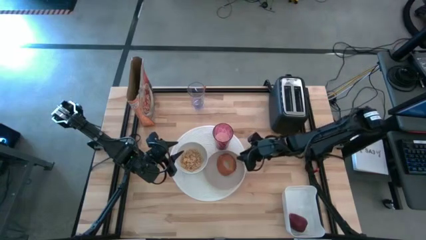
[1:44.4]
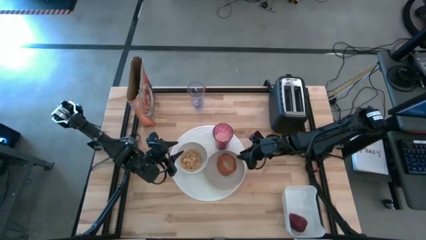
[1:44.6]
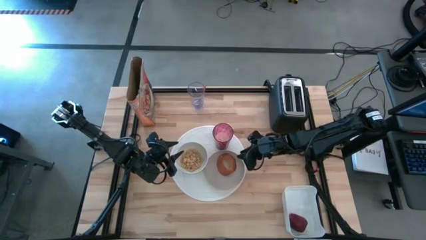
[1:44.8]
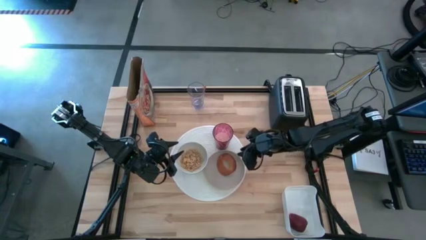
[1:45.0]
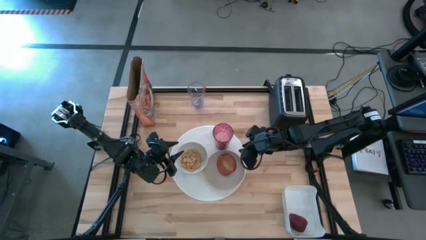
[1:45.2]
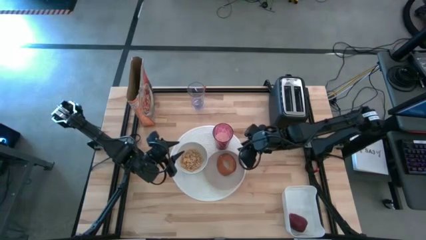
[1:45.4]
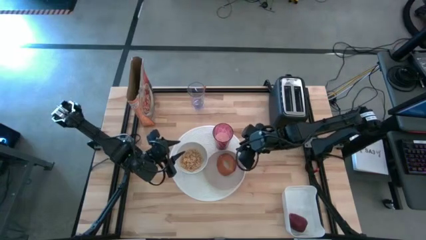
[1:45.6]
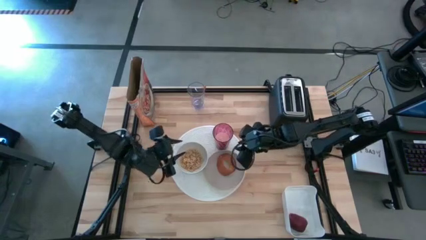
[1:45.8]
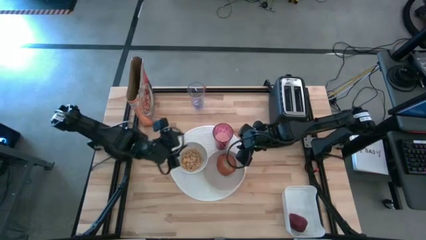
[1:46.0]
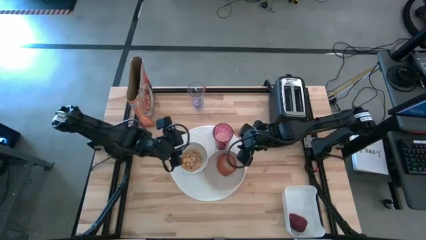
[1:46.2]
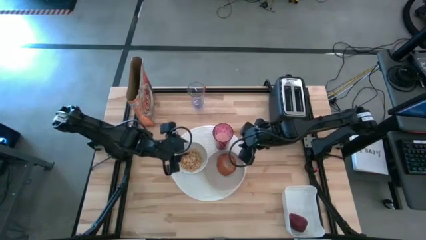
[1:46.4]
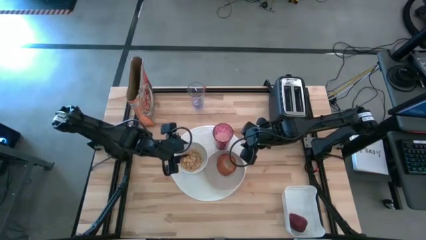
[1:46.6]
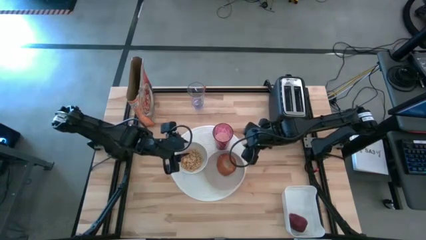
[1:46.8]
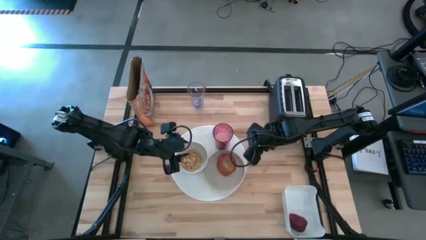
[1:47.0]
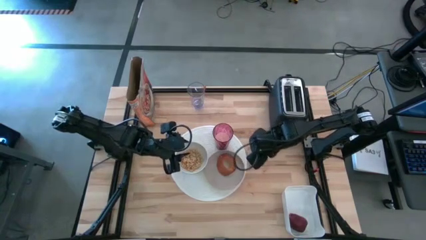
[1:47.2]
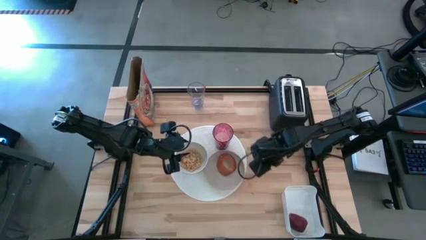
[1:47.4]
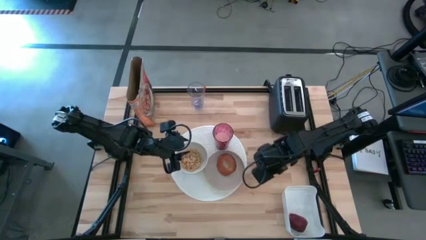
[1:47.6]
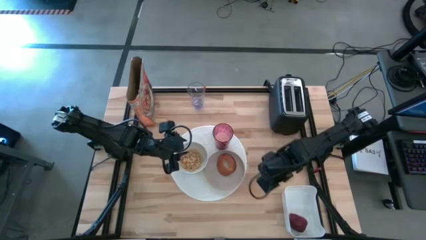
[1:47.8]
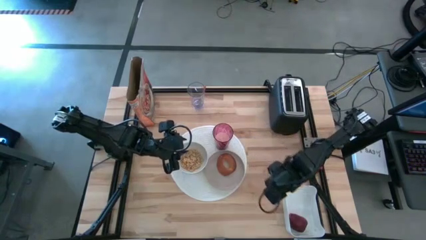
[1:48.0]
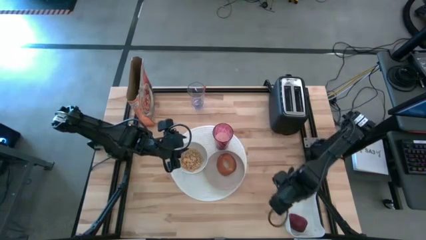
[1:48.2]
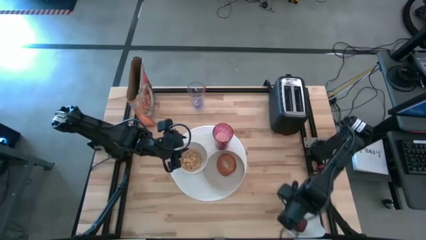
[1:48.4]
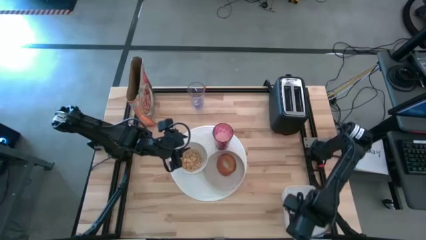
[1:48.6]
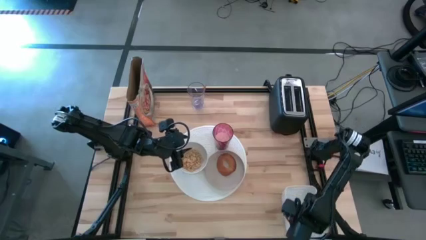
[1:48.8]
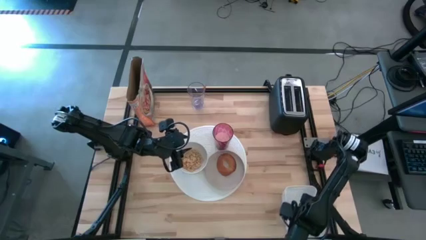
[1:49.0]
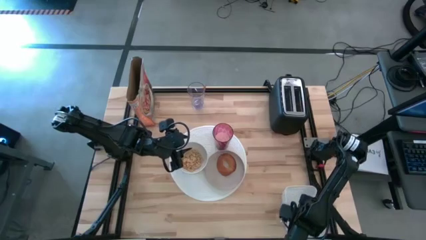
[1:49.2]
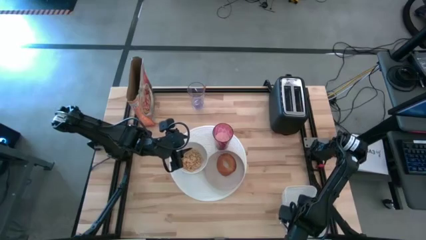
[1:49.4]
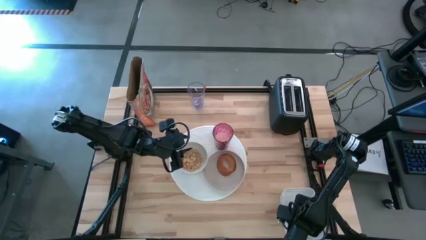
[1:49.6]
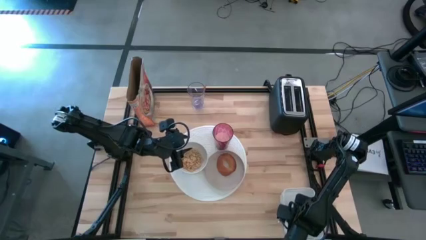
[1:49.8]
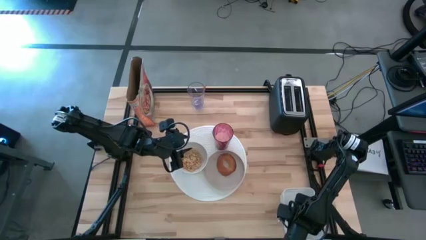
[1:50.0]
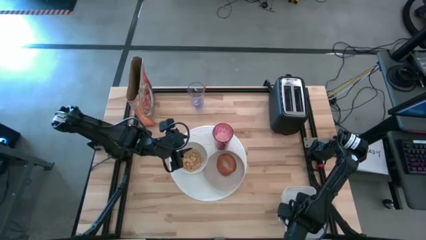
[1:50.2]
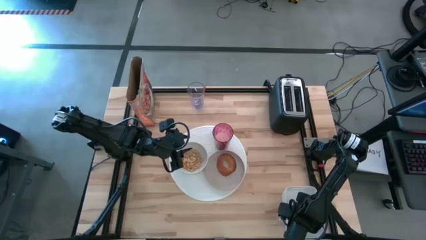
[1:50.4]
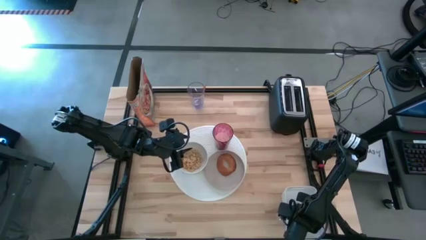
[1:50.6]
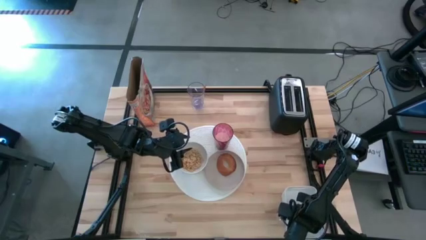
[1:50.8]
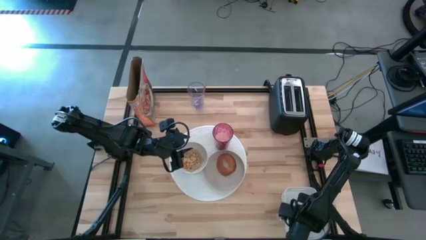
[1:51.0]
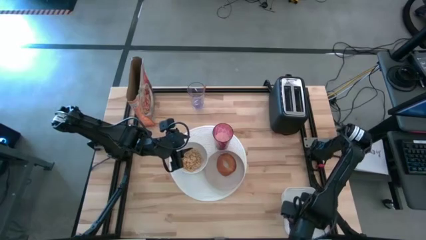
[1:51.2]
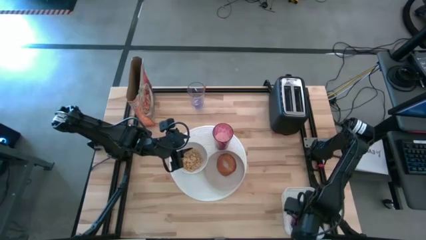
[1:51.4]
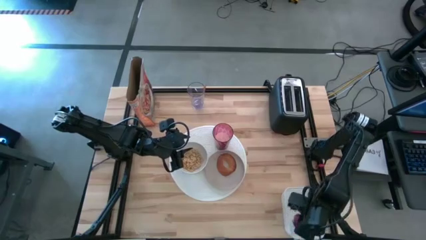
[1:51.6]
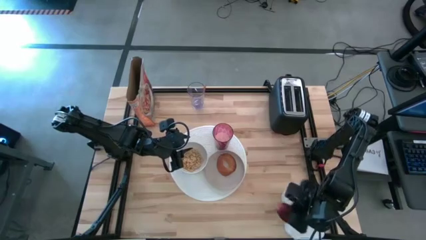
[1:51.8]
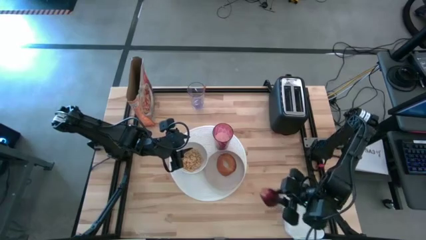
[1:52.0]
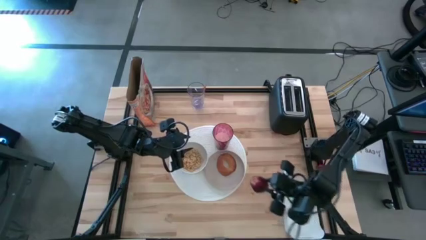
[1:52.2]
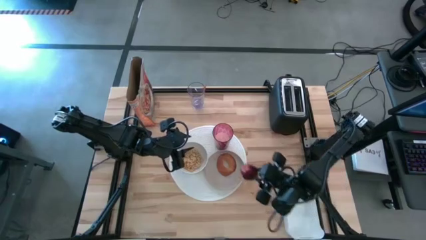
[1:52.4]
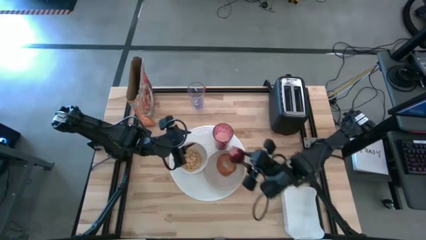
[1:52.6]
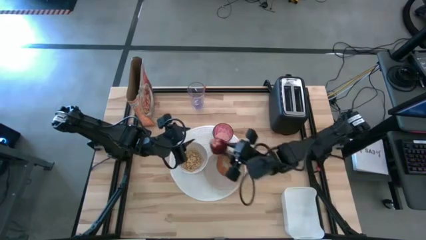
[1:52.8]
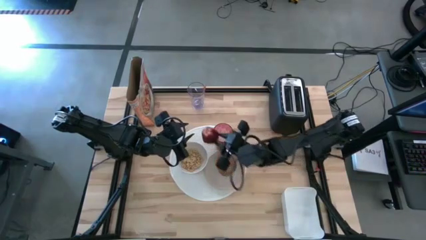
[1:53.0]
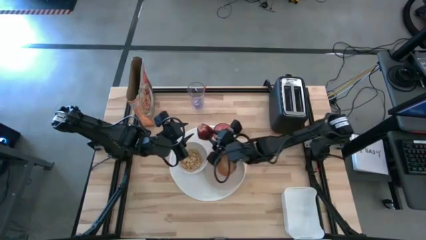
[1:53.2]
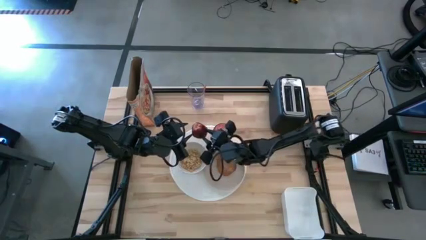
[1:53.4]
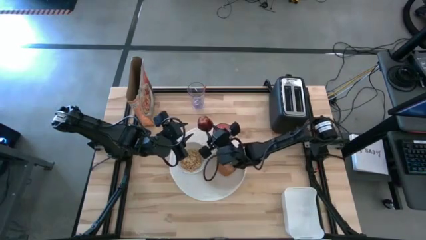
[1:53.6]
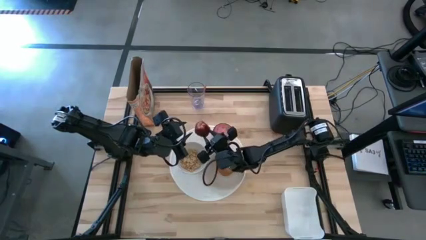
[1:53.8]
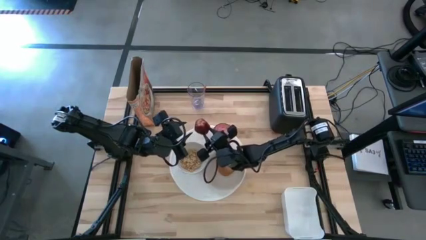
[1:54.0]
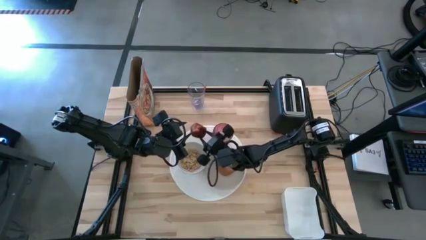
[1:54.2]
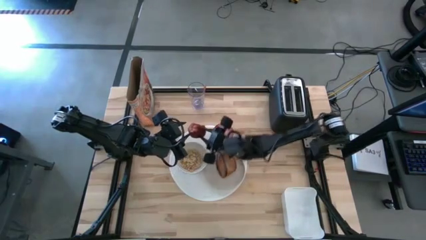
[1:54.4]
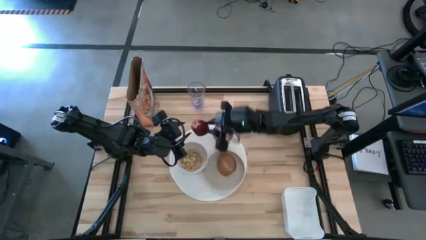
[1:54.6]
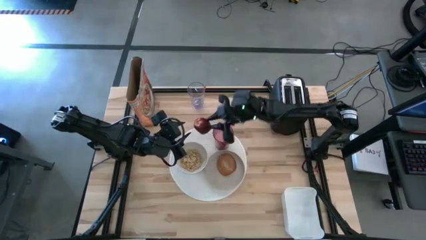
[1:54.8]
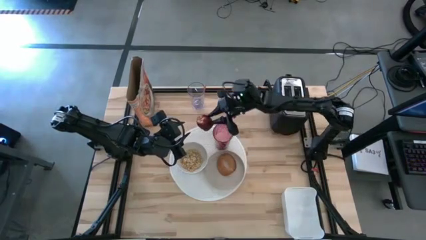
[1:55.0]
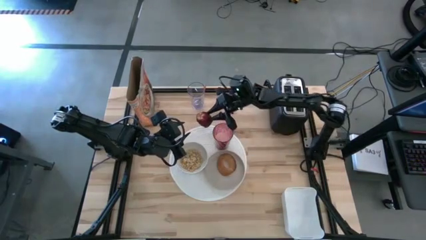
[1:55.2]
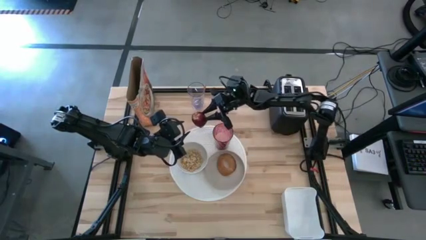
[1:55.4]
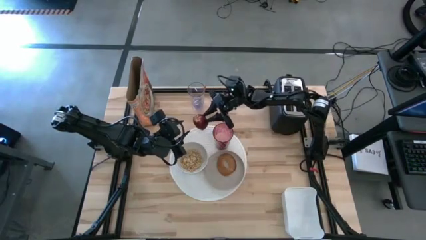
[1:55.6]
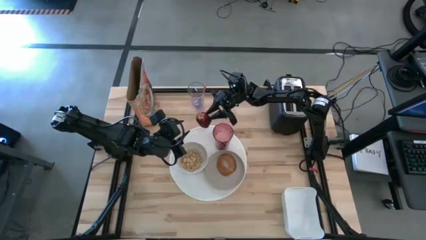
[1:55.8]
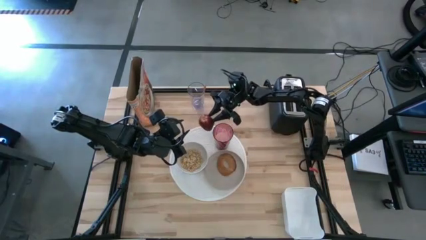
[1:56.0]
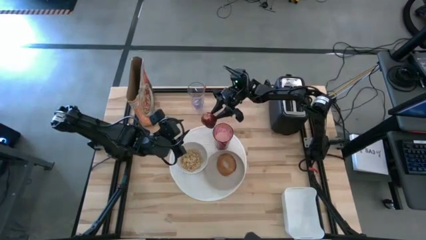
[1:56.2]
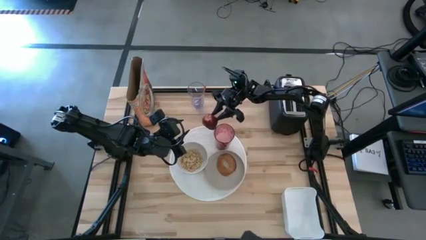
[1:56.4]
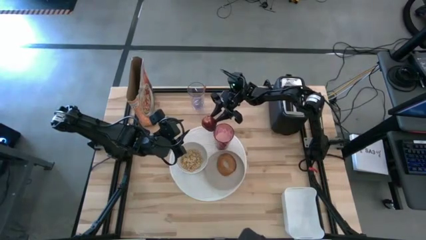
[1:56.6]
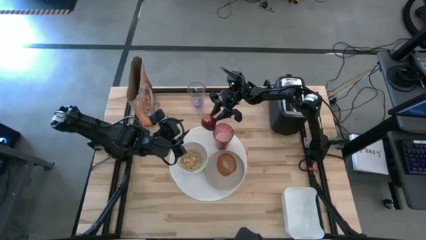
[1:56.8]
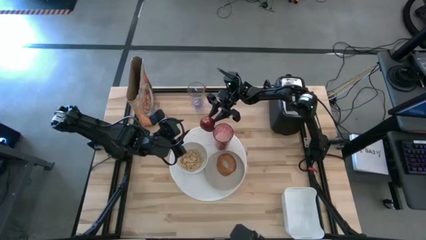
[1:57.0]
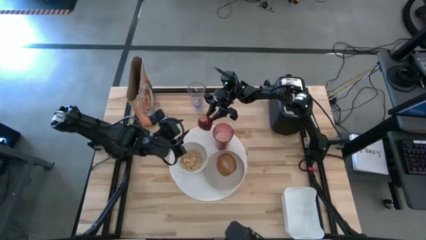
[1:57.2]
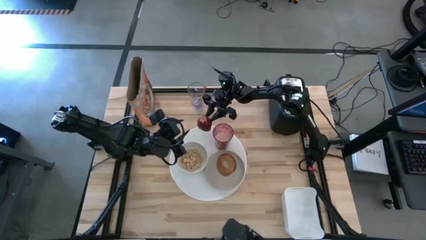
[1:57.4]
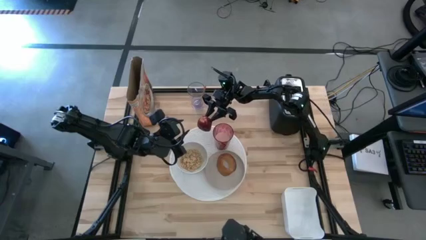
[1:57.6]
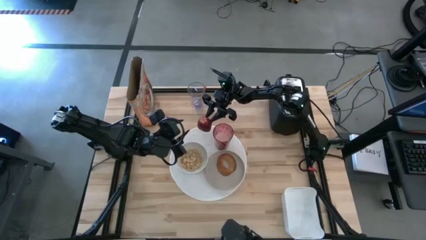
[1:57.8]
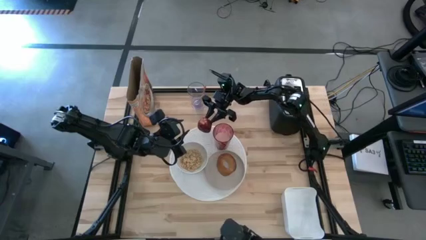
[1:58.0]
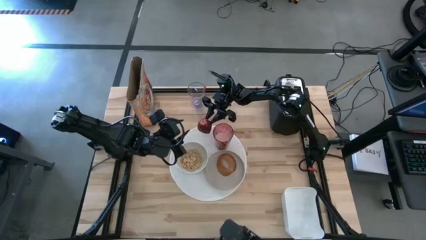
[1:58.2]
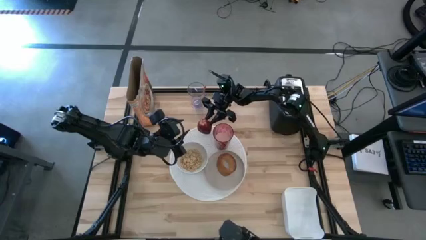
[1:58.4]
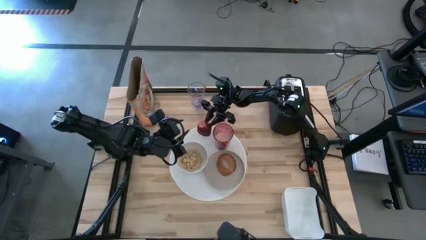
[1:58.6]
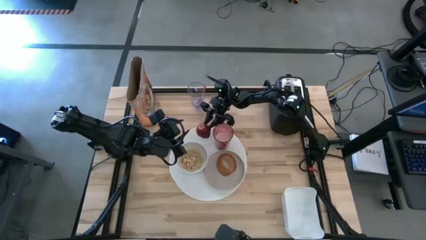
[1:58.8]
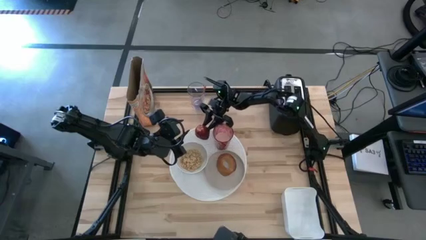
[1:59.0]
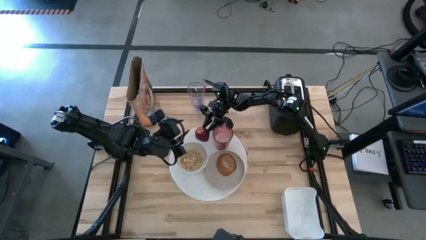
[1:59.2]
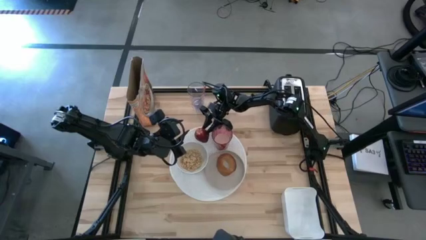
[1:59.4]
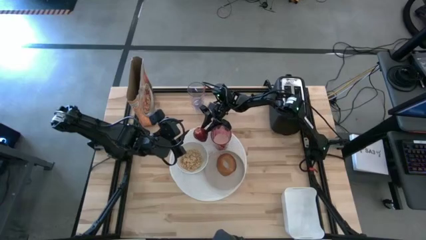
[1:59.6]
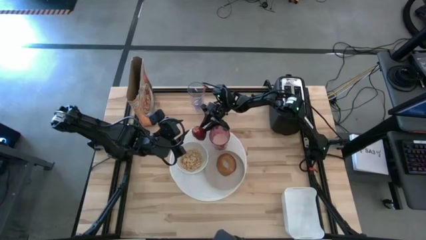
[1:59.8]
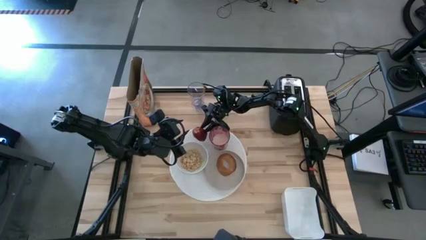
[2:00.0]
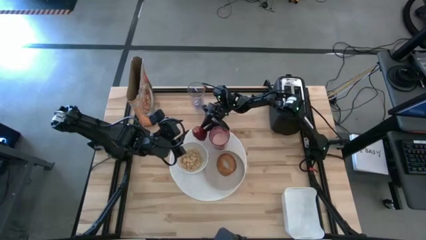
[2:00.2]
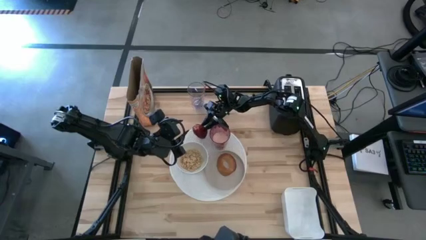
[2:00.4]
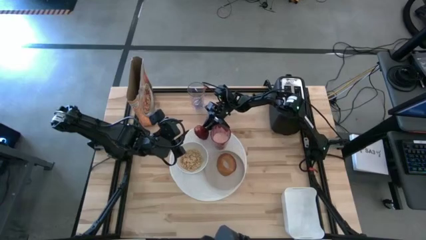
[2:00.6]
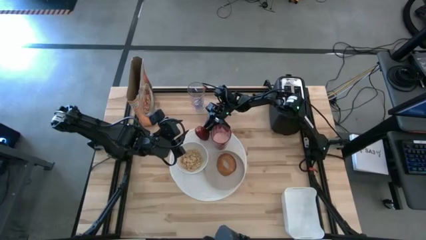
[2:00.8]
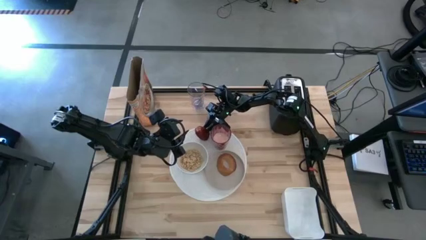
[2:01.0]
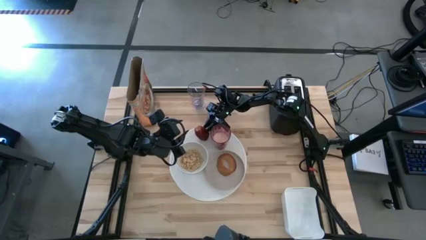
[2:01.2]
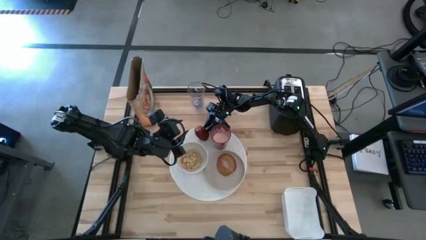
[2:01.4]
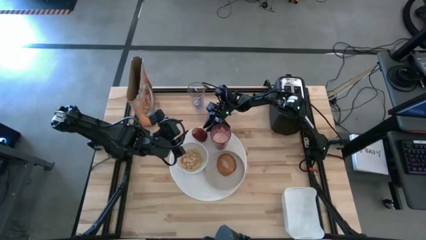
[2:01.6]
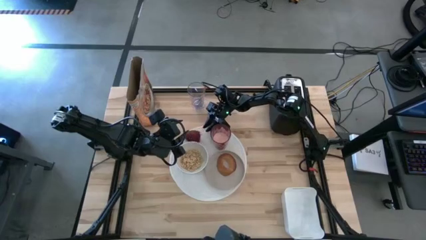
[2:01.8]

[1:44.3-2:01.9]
Task: Arrange a breakfast setting
Put the red apple on the white mat

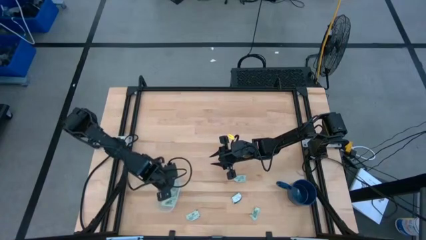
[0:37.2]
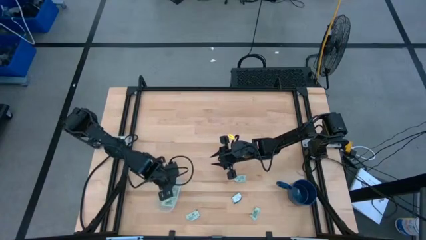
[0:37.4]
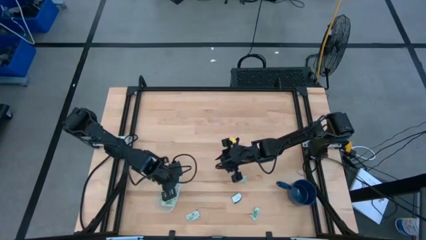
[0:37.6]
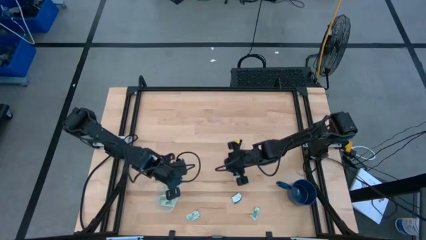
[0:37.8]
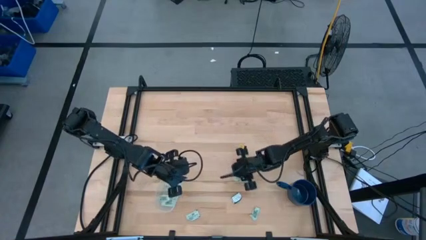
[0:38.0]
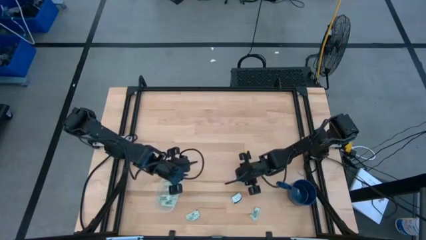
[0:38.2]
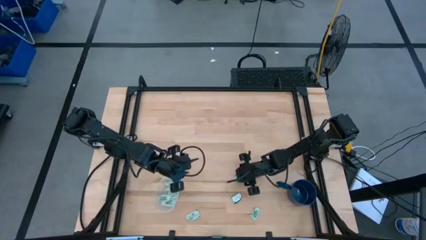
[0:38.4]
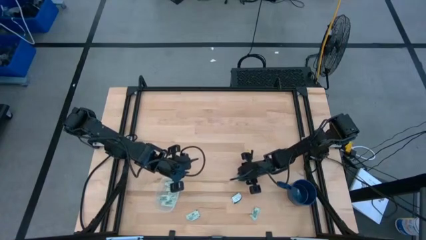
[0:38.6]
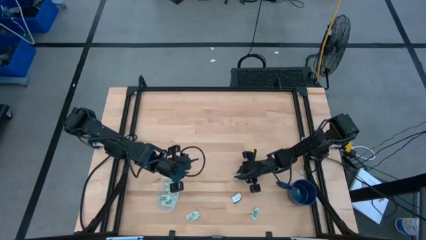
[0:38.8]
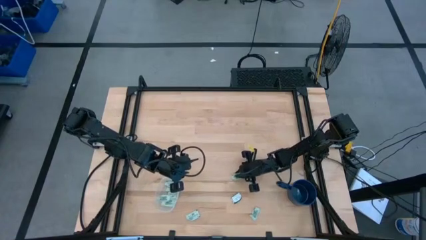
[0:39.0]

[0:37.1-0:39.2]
Task: Pick and place Stevia / Truvia into bins
Put the stevia packet into the transparent container
